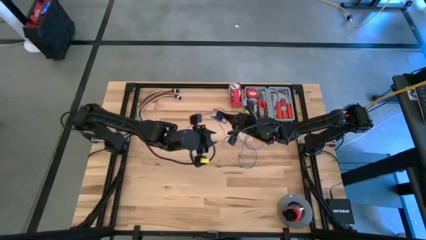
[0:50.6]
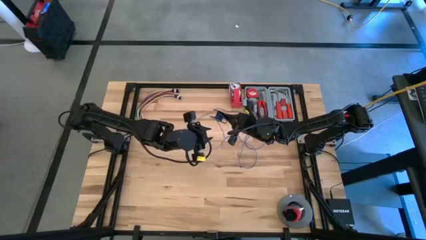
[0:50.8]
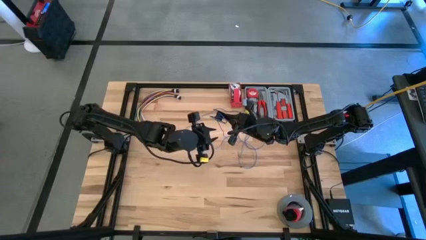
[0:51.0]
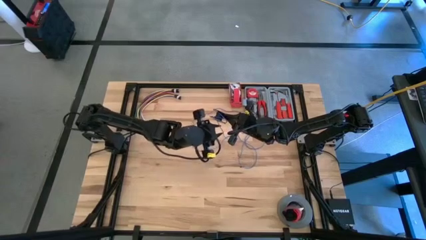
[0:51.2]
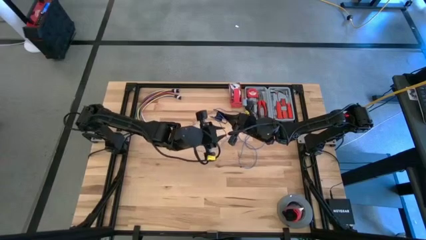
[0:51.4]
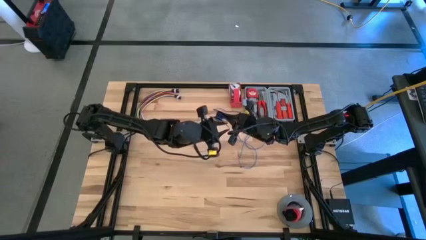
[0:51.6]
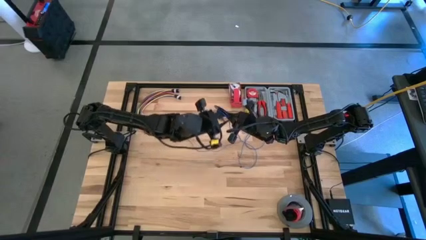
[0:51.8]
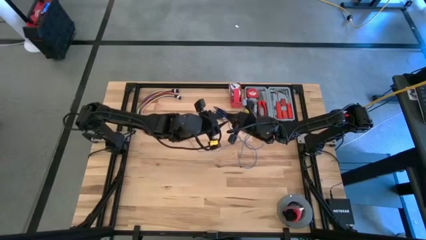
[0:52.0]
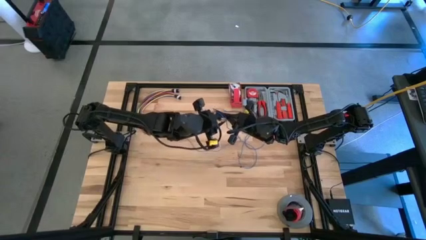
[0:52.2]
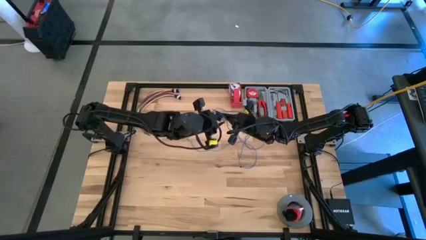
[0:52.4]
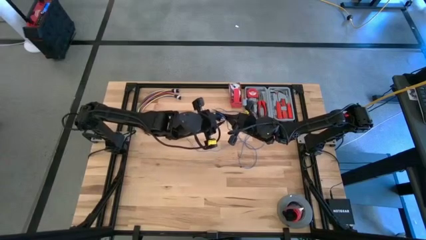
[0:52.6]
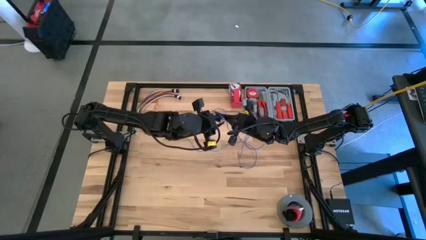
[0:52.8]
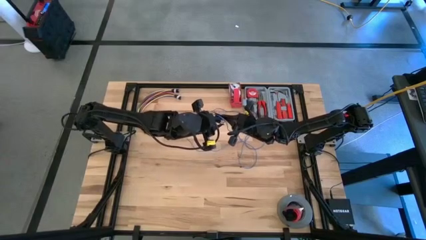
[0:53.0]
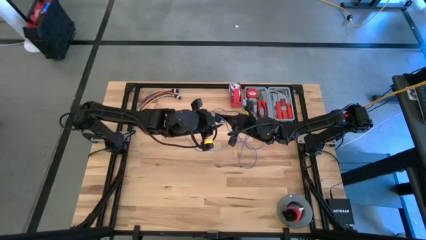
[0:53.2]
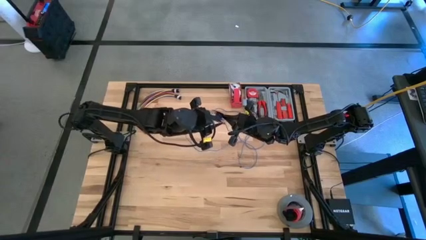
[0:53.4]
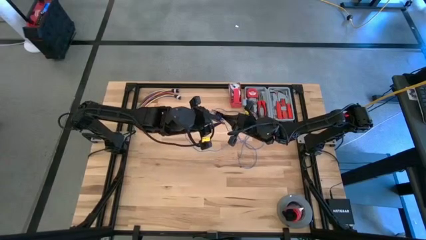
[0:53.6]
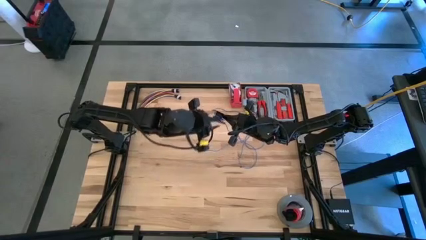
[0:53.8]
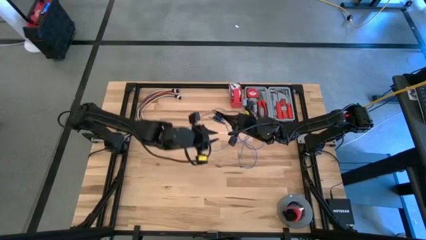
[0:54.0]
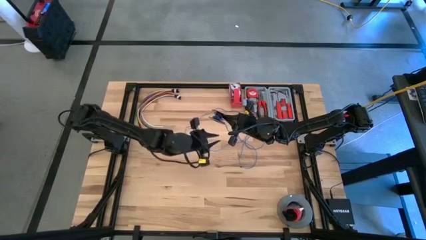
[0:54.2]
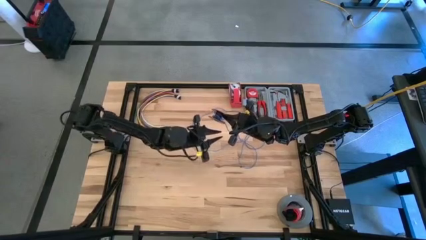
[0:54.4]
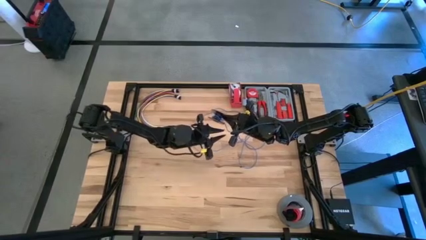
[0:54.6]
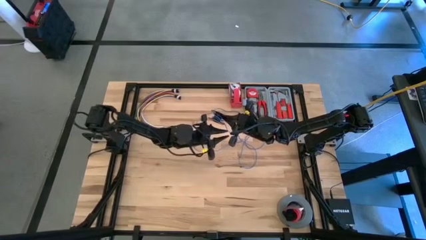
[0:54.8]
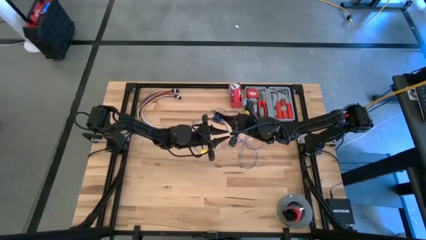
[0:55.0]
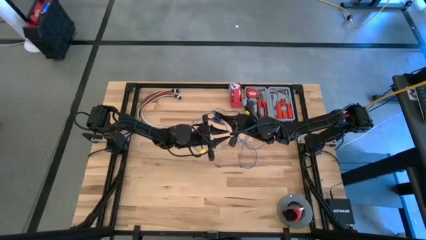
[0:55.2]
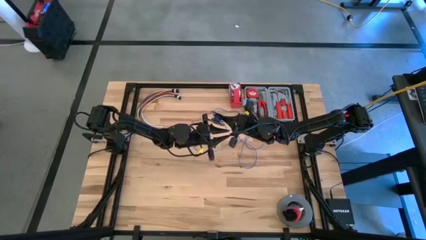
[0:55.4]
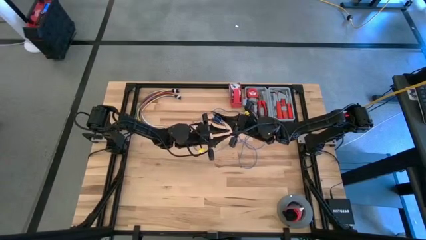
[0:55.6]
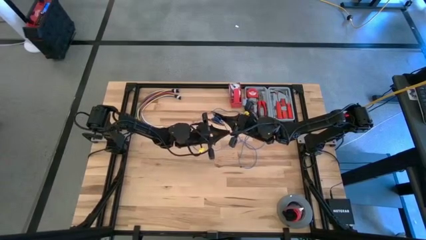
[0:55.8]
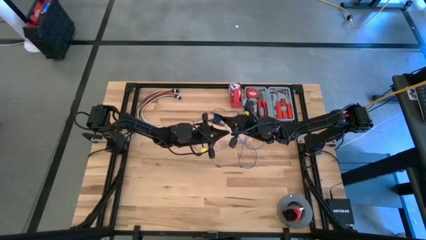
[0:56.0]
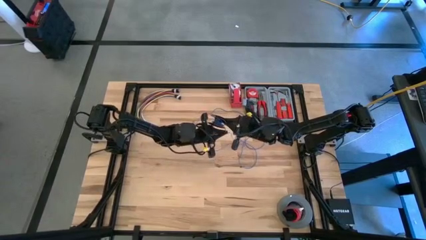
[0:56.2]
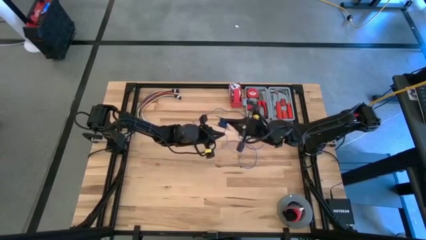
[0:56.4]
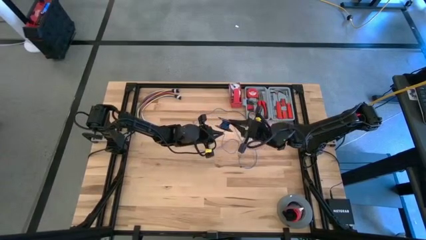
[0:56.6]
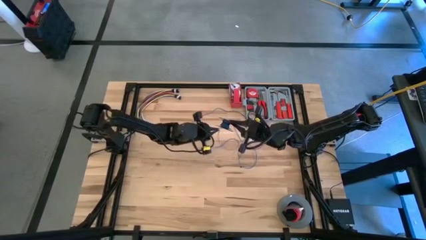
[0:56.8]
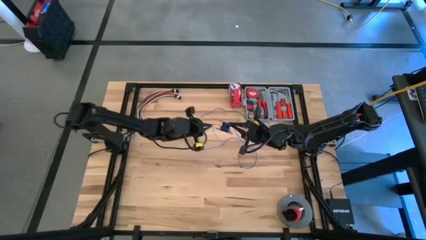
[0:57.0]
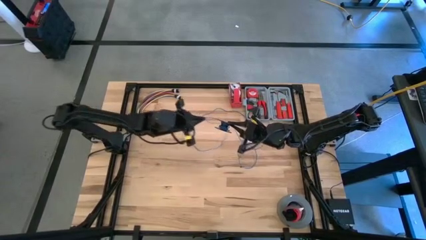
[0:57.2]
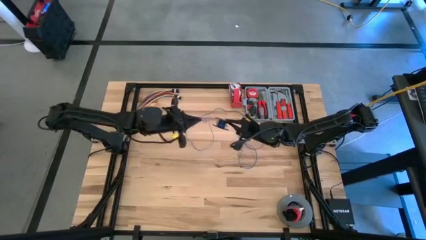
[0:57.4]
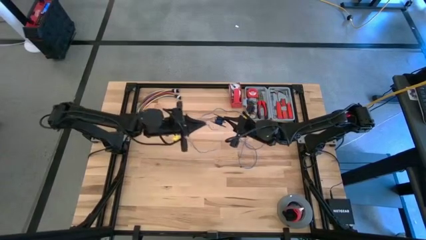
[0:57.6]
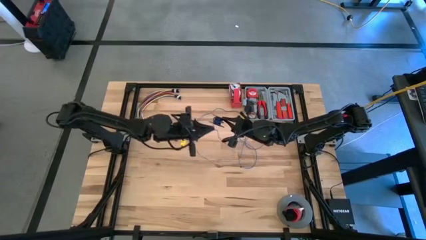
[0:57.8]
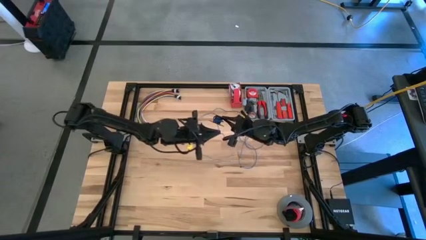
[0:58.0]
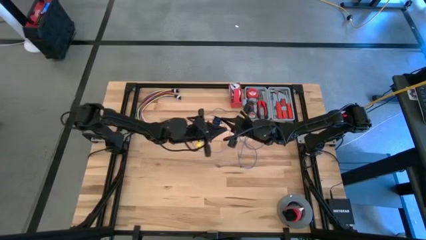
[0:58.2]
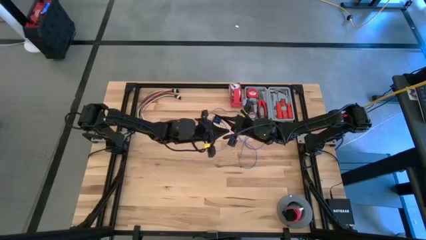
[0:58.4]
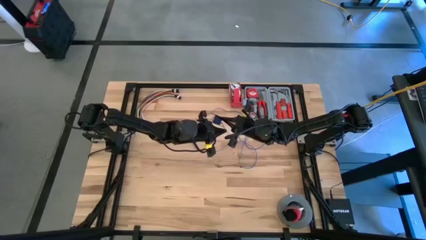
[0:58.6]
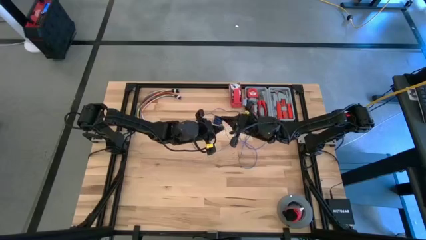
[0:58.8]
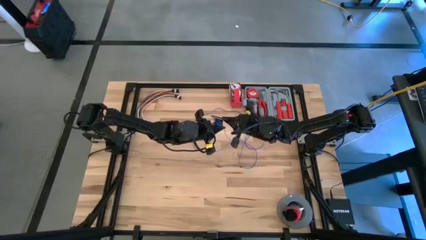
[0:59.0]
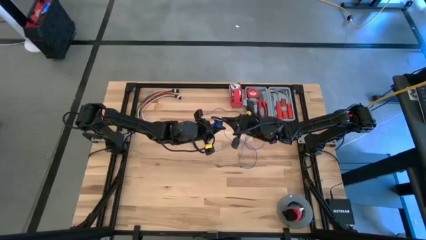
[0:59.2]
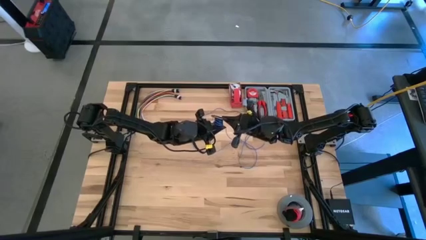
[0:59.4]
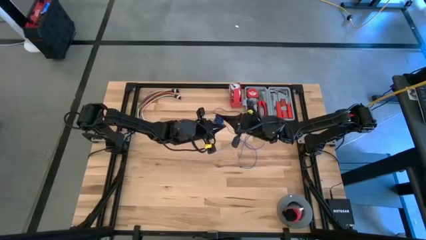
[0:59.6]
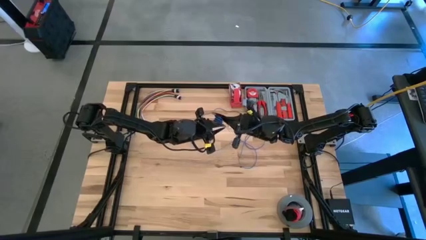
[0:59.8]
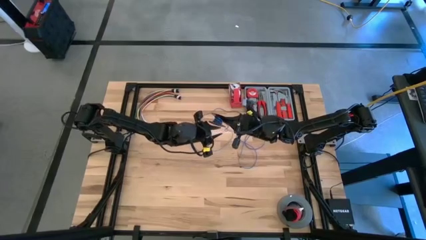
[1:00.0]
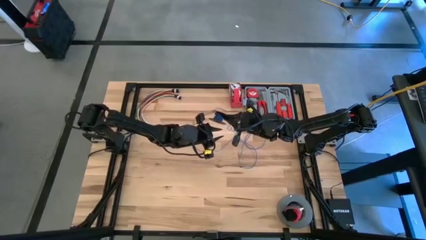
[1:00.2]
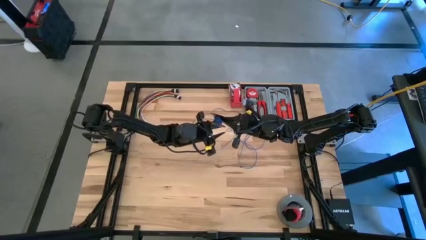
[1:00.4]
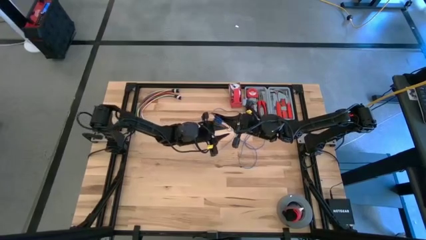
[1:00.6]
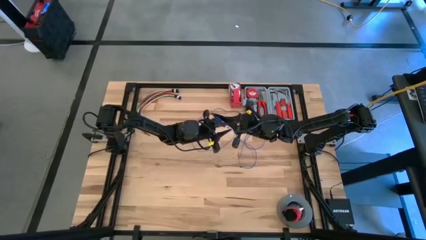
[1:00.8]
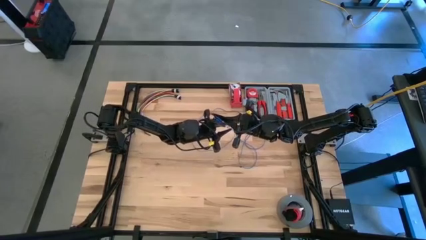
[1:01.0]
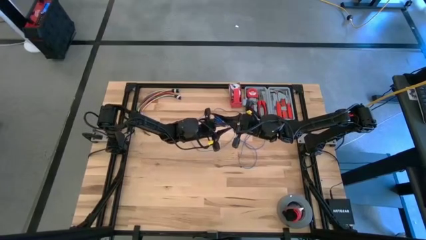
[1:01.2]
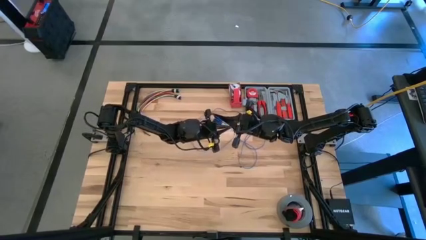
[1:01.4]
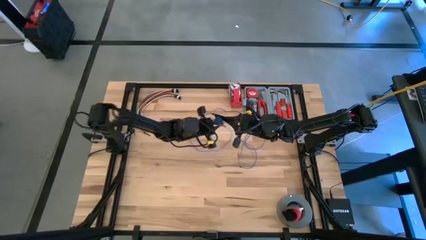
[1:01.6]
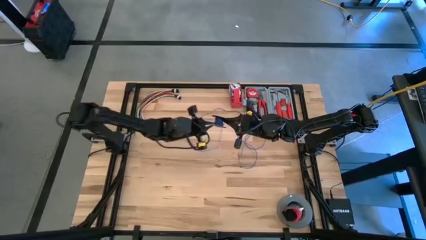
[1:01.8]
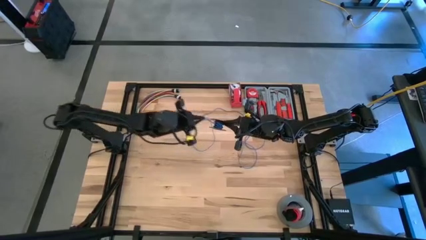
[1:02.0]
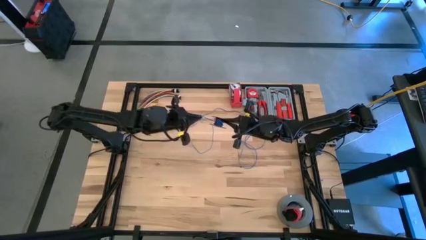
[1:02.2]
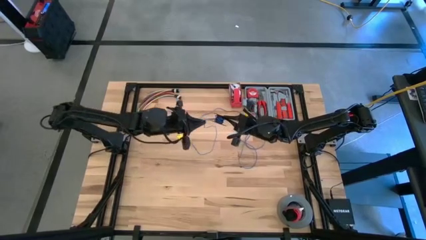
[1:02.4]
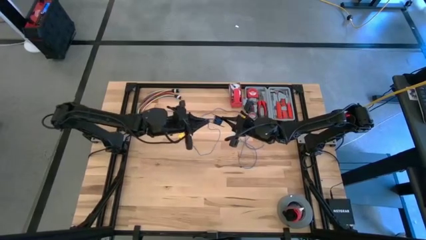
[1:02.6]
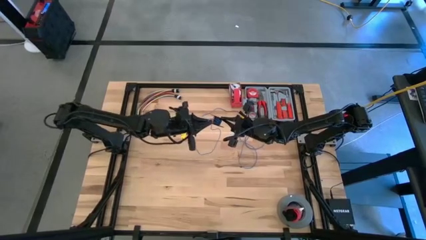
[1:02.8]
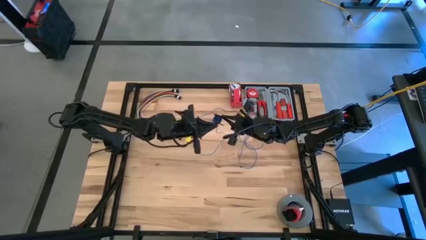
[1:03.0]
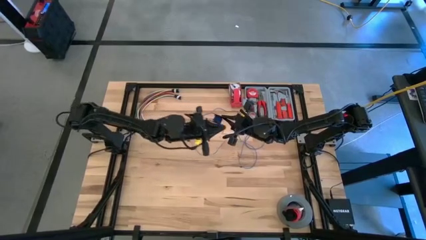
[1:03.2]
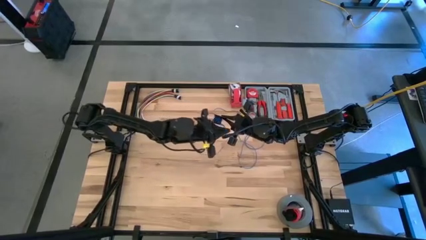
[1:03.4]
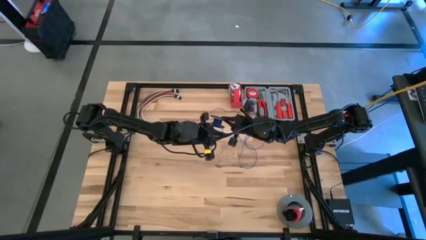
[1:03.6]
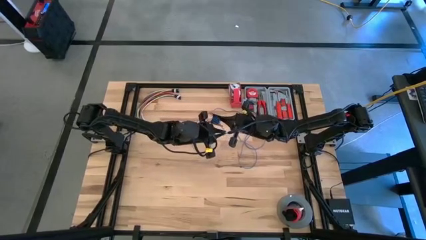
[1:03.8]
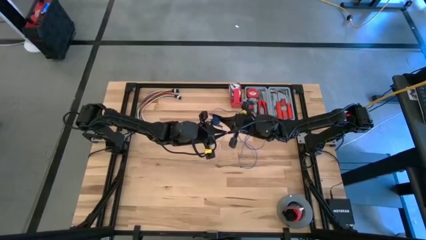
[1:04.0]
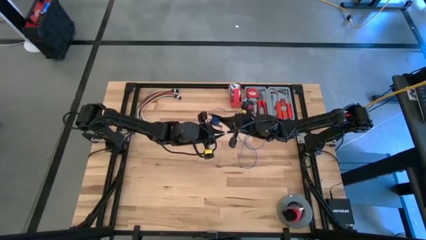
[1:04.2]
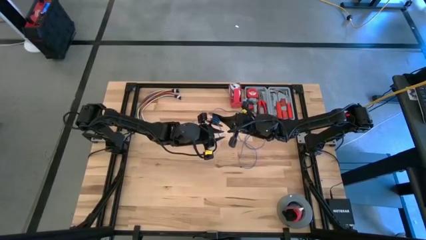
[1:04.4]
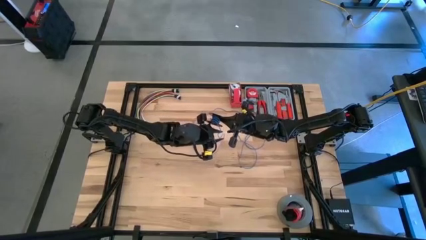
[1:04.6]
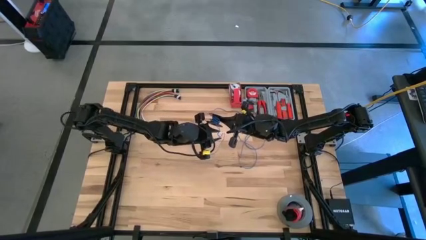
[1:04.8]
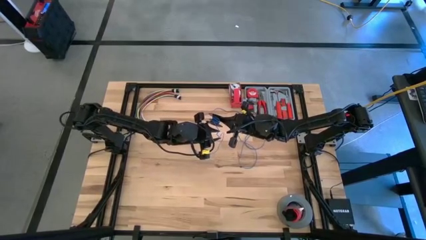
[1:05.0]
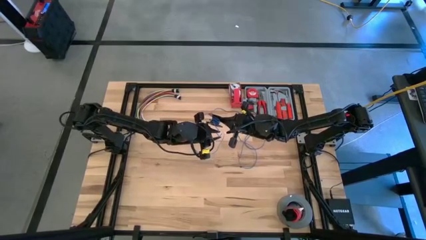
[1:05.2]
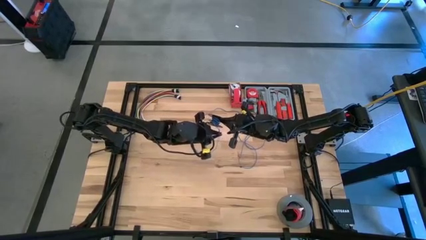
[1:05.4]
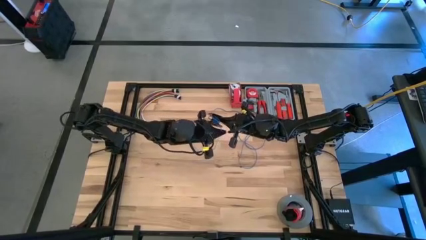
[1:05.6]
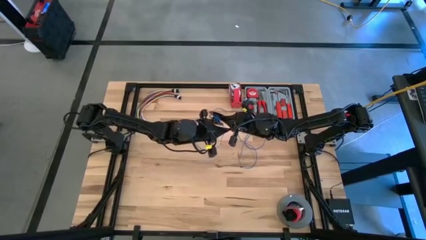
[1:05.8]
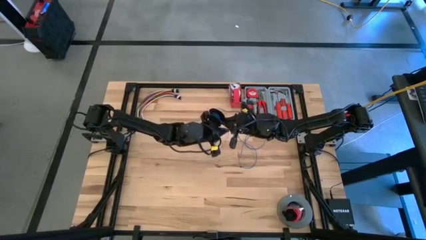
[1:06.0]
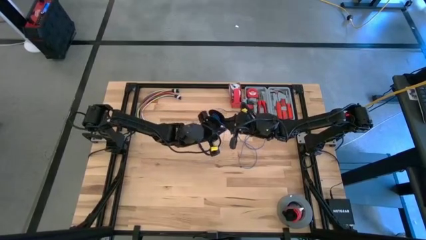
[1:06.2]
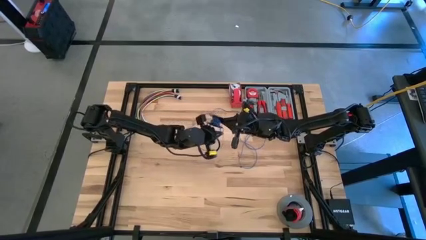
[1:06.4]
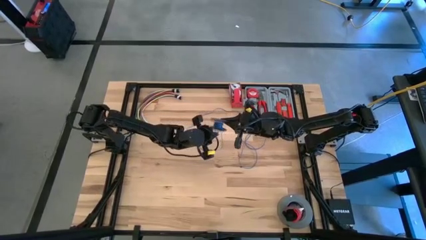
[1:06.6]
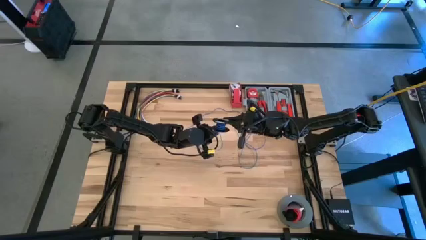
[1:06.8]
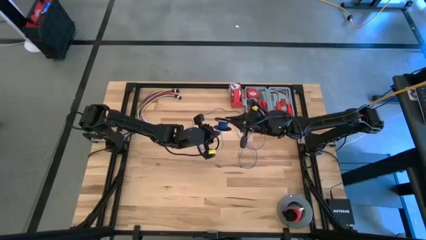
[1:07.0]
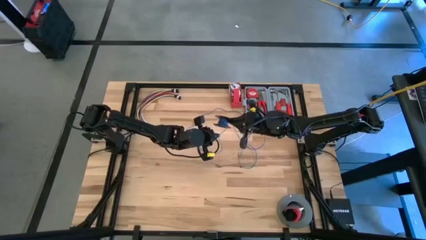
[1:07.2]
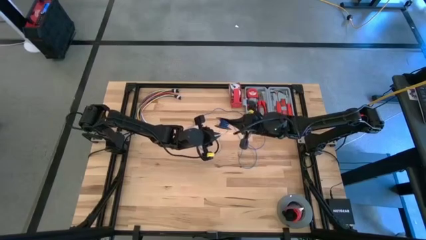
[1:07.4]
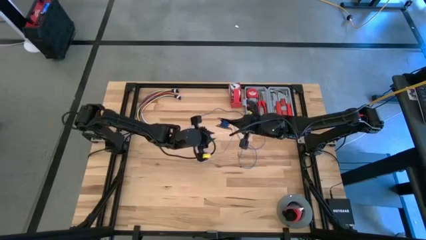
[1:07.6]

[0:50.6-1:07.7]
Task: Coil cords
Coil the blue wire on the black spool
